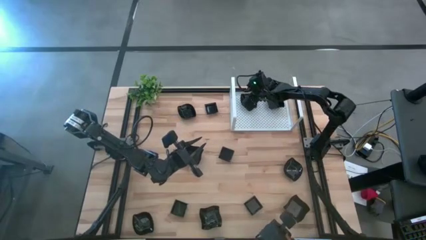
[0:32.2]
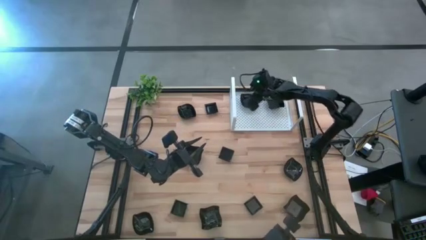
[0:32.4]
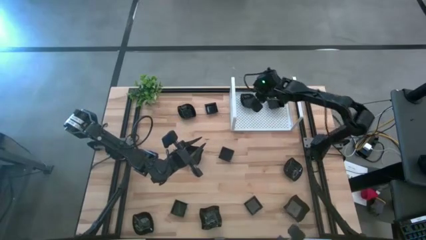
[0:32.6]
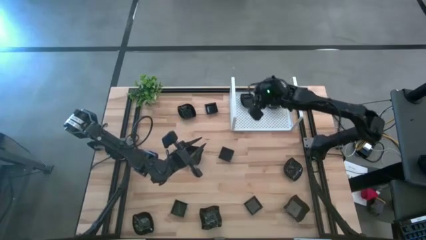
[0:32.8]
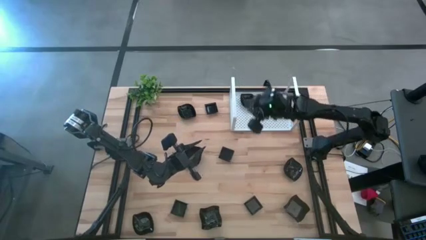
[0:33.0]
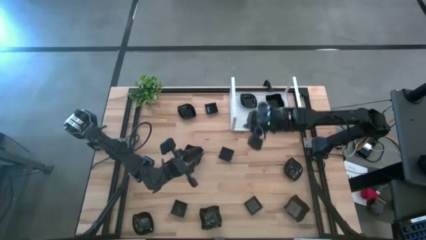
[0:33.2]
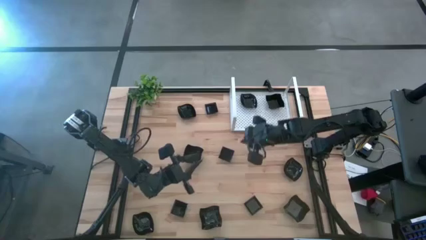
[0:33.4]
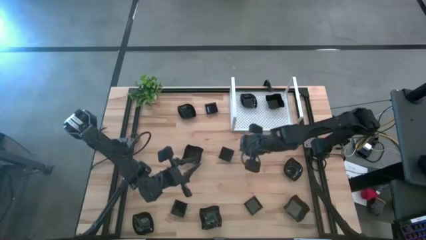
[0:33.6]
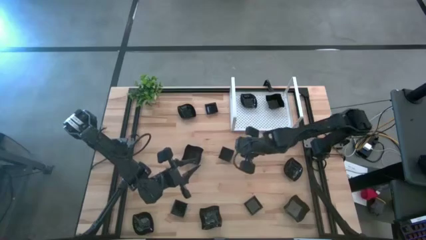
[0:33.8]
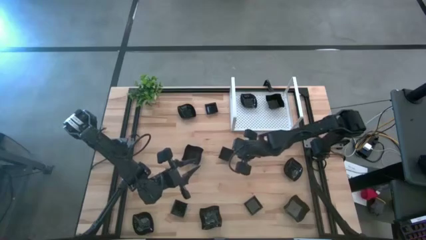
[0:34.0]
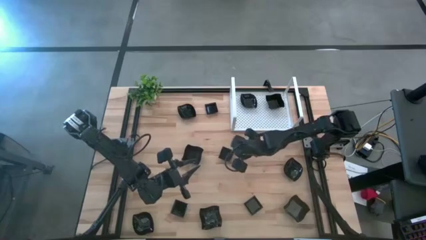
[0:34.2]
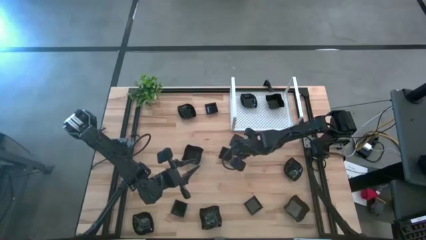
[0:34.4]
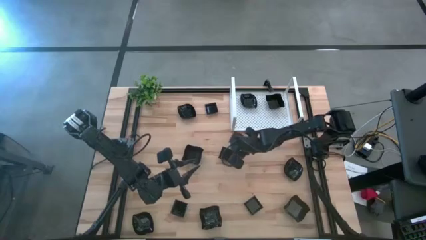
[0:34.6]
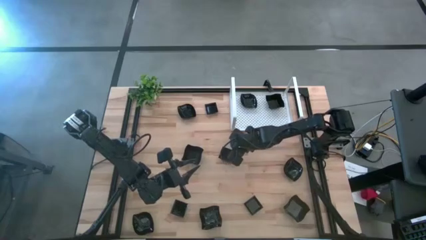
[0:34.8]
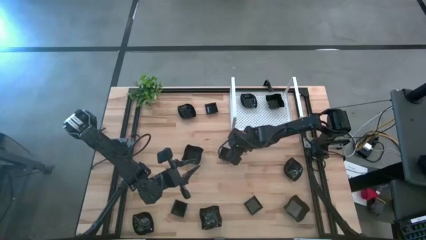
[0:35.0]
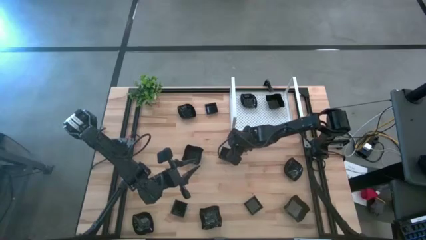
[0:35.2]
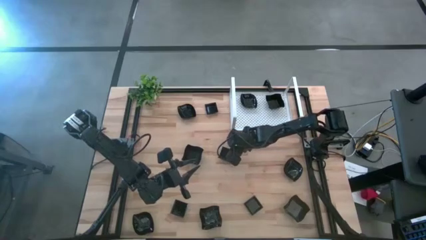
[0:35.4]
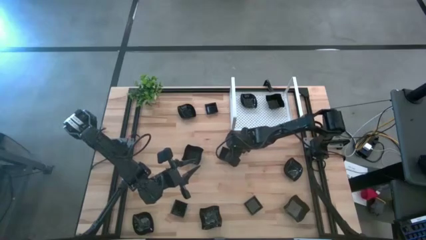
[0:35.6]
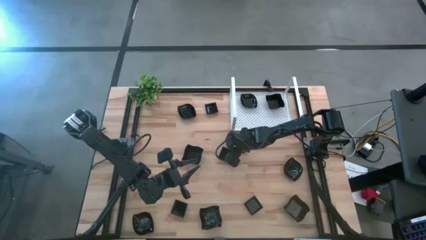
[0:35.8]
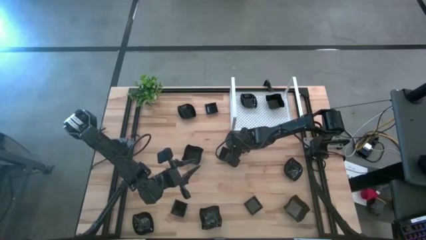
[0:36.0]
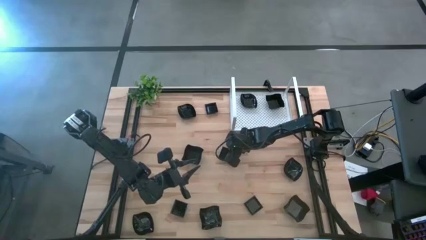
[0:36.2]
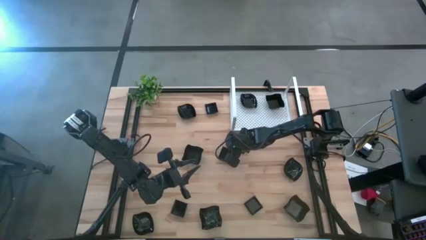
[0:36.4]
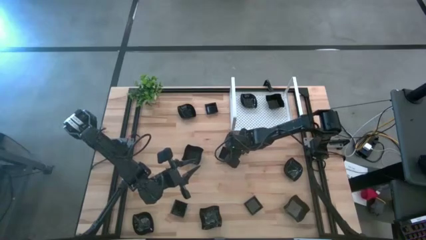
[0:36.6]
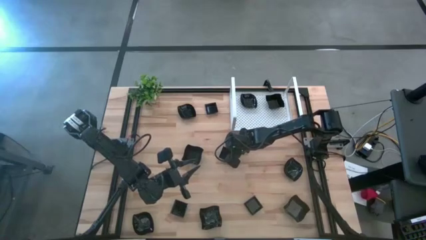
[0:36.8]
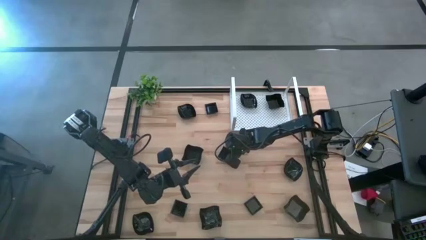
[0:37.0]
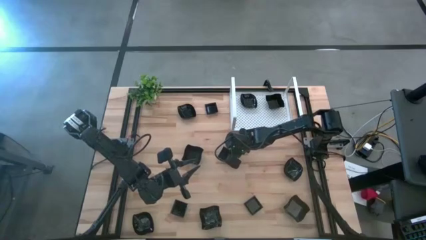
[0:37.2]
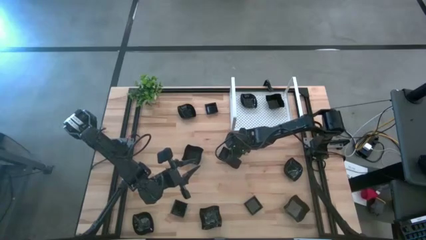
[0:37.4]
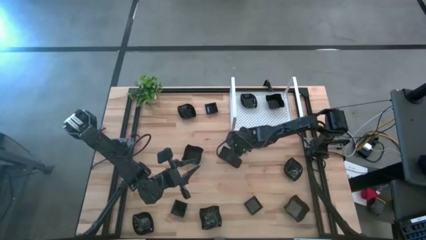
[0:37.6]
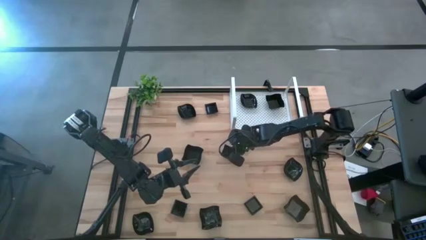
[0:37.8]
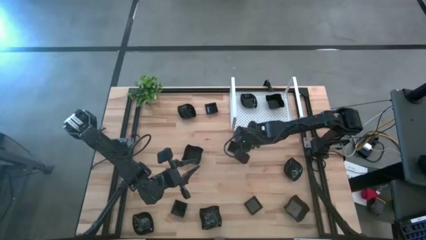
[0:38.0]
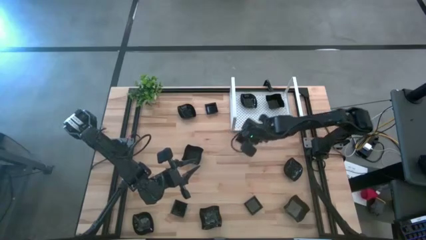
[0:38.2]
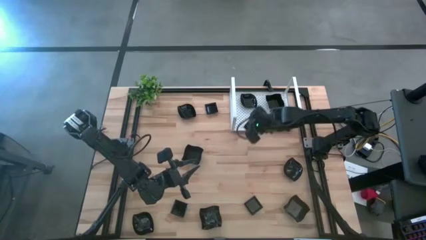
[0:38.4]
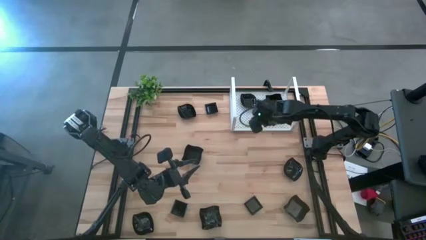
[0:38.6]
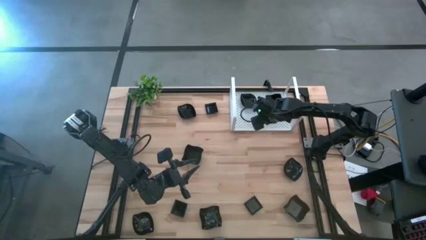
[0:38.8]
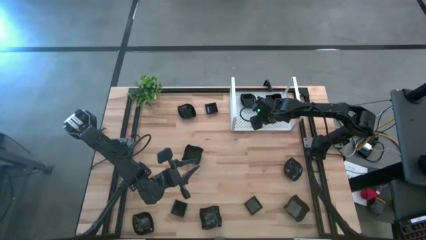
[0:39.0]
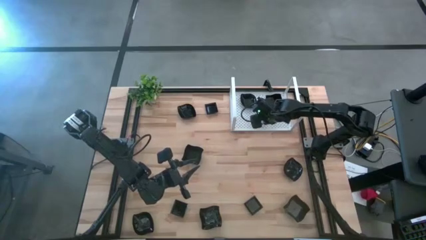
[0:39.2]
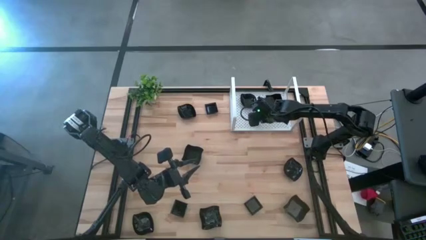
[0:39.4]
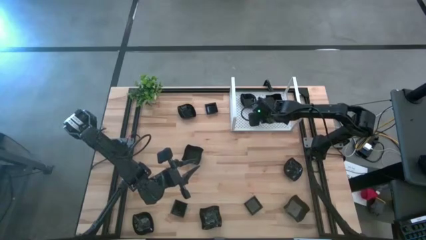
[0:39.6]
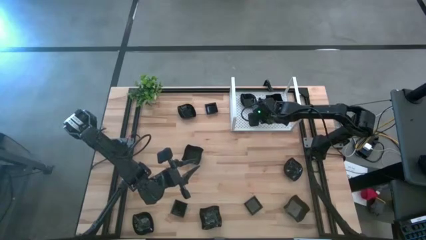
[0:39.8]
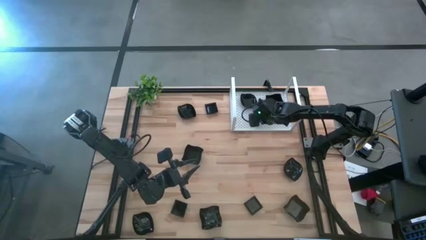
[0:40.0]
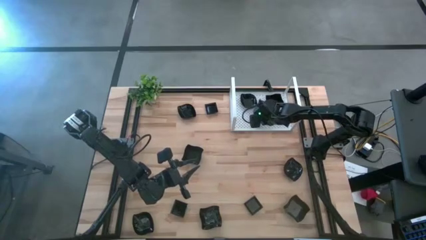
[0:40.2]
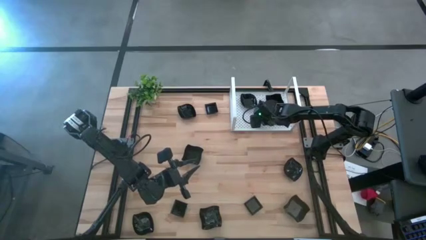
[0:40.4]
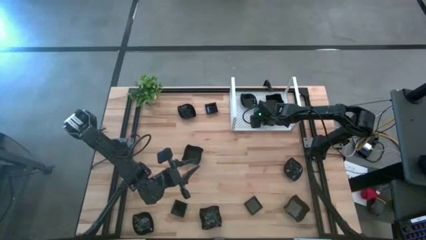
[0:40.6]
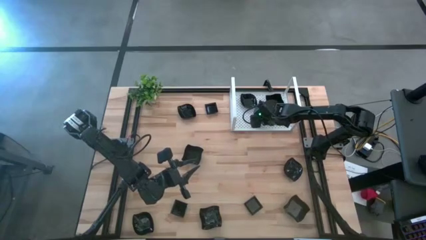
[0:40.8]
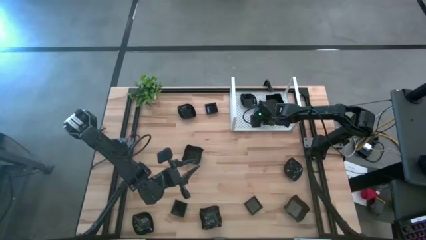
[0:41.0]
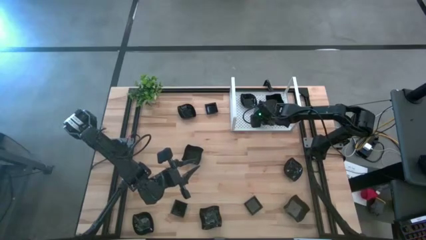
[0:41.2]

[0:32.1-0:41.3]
Task: Pick & Place Mini shaped plates
Put the square plate on the shelf

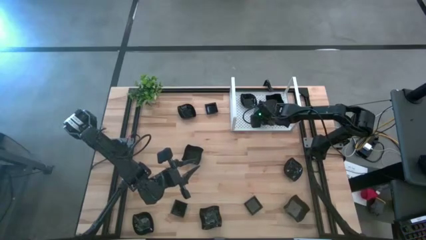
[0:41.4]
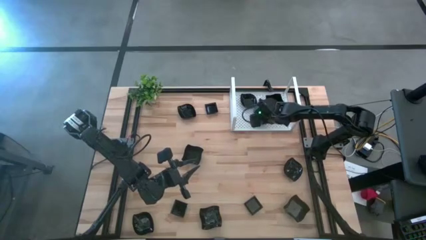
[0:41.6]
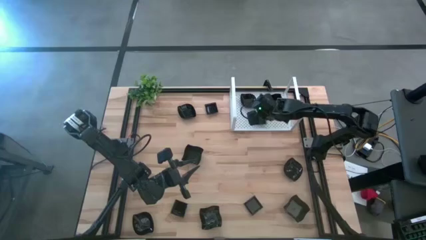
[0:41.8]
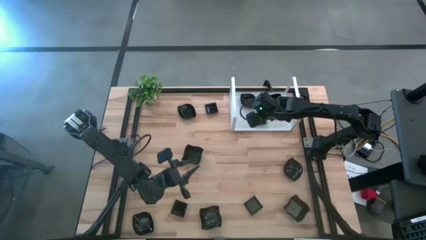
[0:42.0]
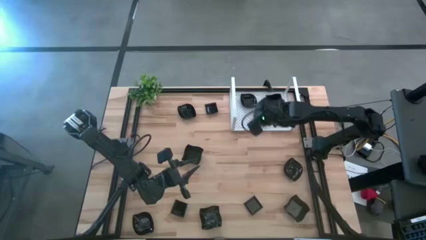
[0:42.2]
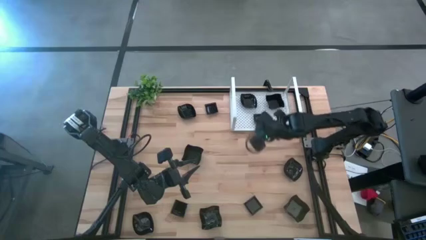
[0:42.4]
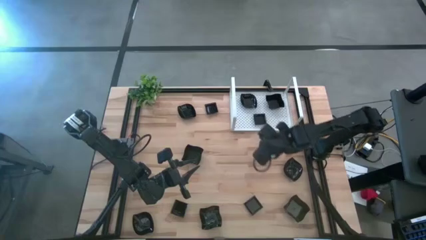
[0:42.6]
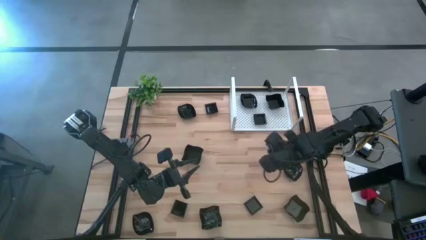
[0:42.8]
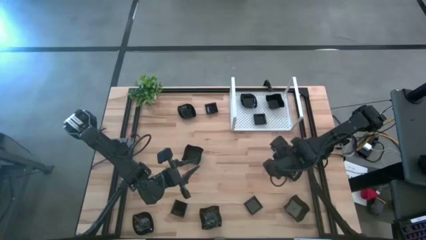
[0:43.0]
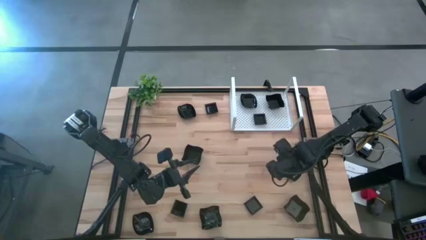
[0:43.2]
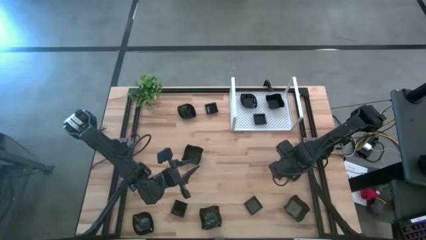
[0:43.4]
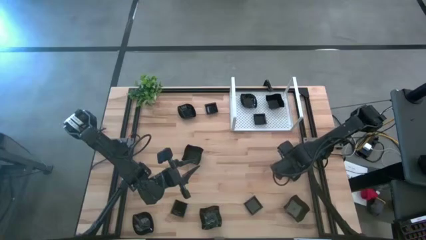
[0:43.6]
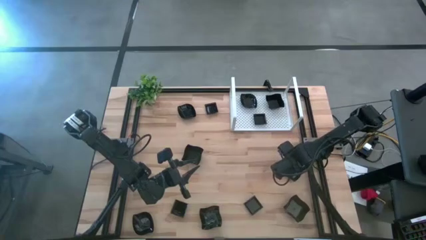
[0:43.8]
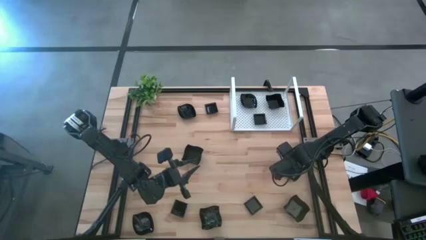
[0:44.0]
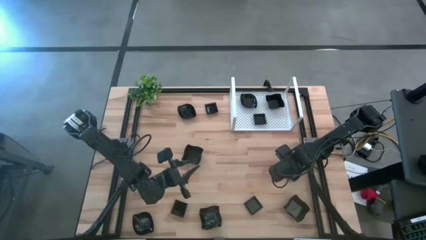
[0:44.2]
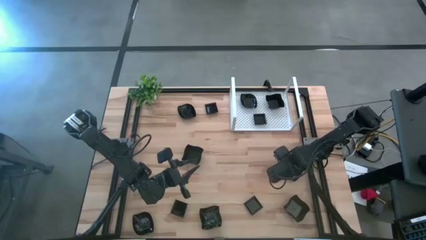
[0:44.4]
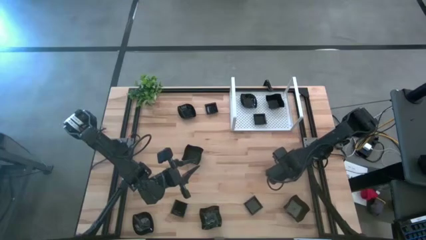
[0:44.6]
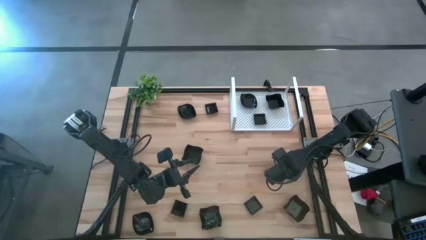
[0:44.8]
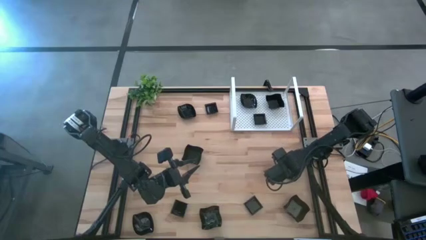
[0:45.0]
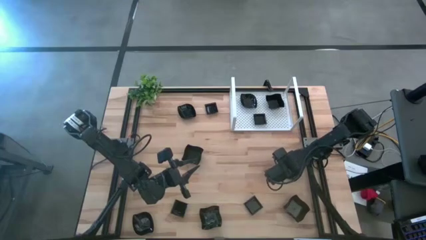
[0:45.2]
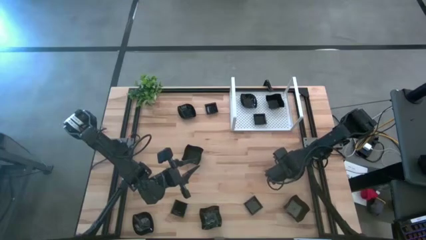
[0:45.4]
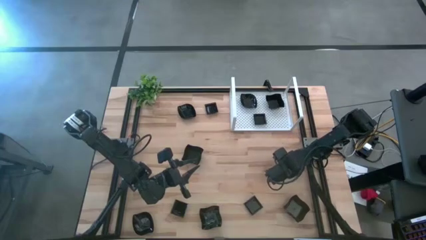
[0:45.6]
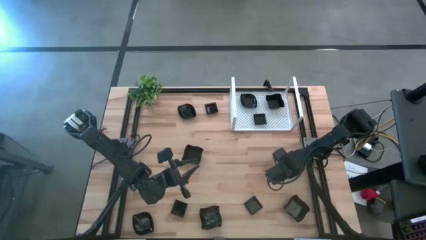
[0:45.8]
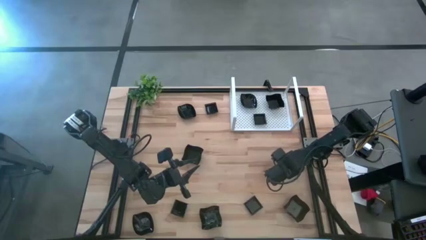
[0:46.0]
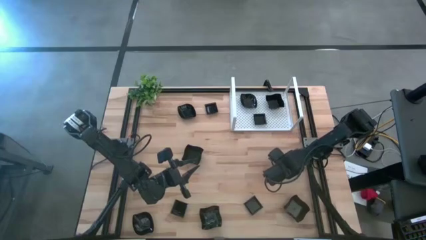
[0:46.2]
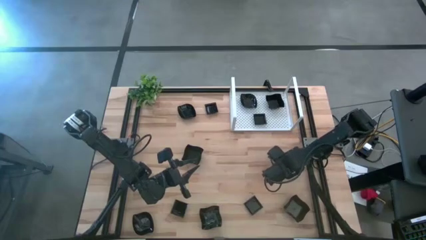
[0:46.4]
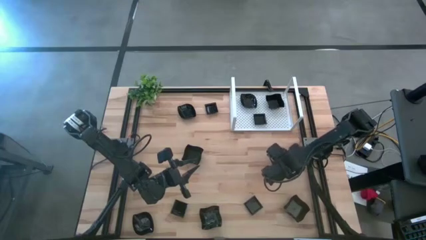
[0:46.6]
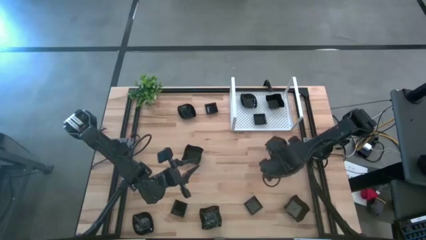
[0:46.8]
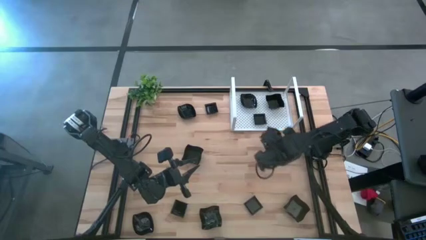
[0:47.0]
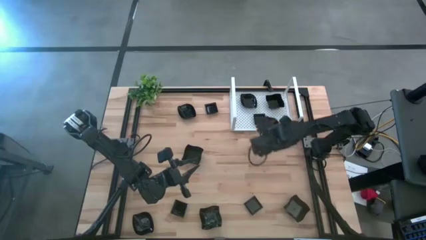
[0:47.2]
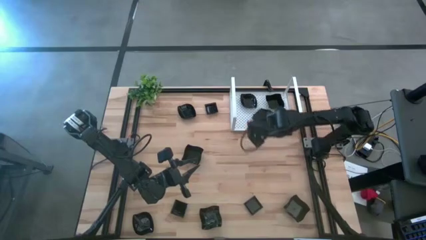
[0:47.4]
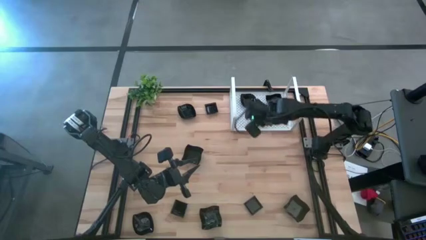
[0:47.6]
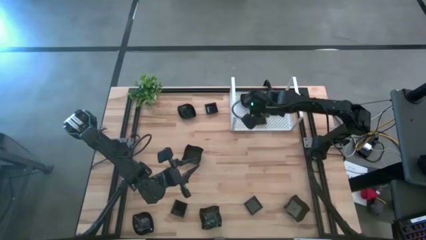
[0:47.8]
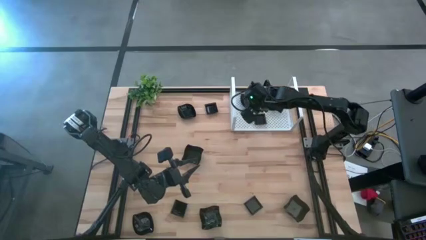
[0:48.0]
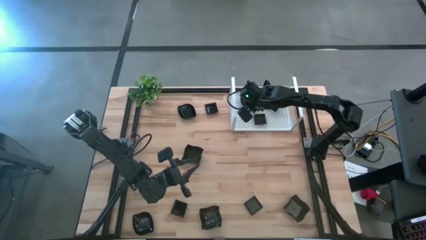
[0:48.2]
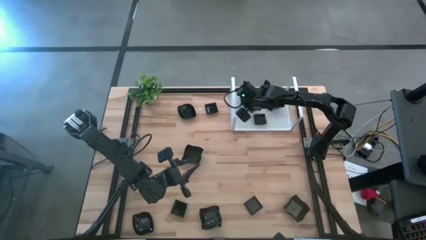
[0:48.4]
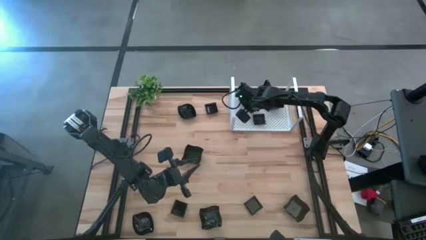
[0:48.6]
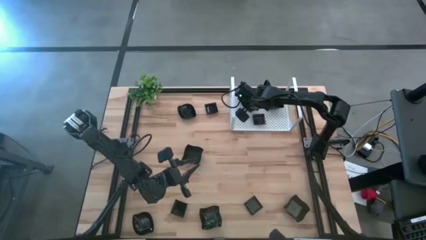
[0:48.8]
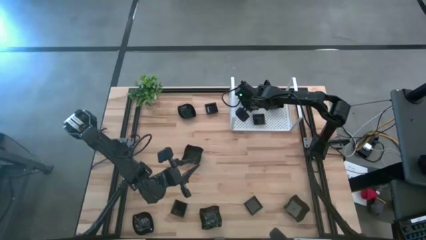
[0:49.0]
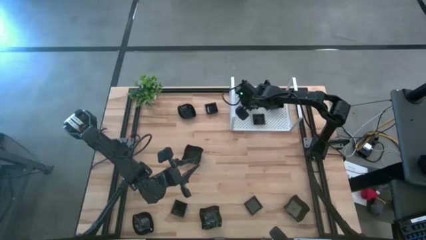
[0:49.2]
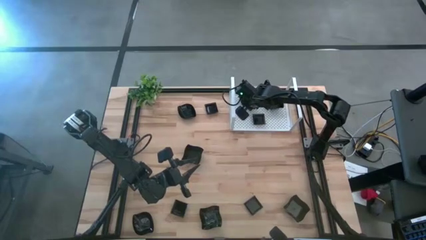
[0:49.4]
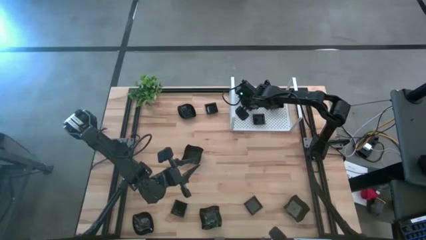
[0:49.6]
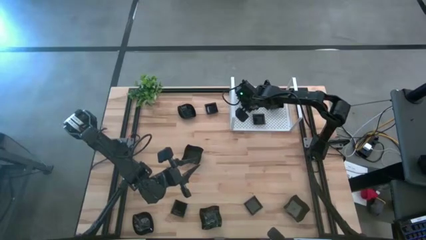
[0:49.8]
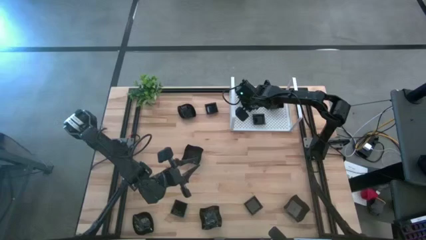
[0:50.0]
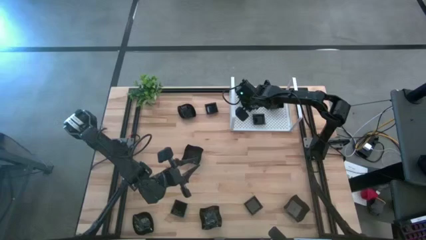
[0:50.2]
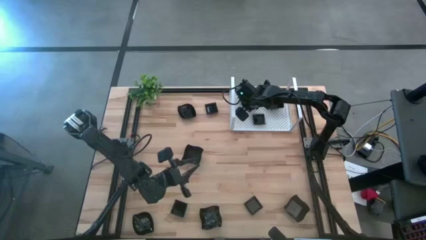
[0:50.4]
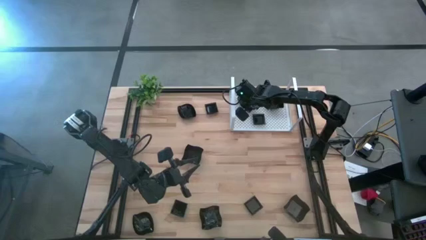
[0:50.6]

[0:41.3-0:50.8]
Stack the leaf shaped plate on top of the other leaf shaped plate on the shelf
